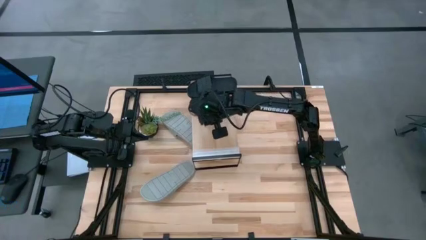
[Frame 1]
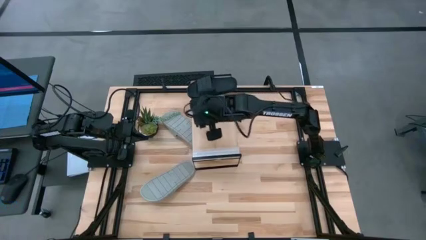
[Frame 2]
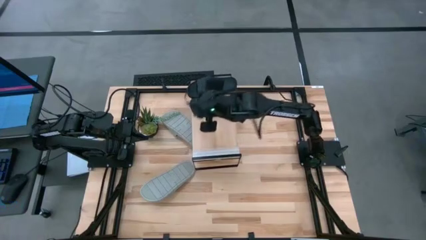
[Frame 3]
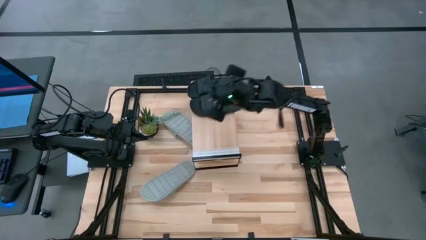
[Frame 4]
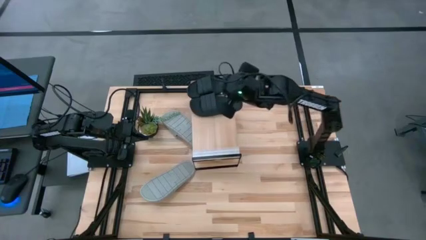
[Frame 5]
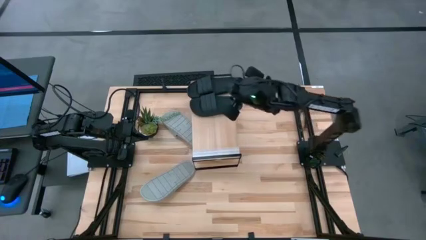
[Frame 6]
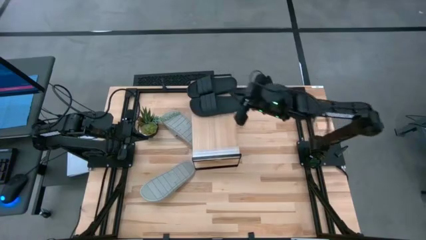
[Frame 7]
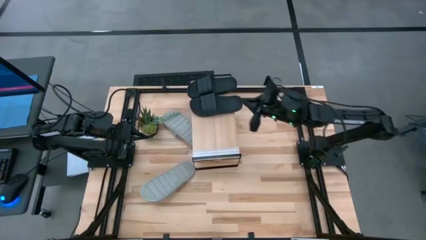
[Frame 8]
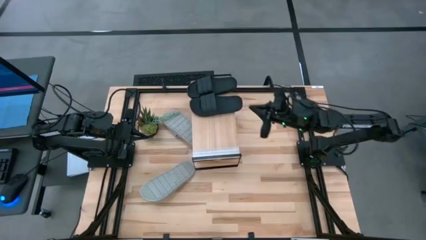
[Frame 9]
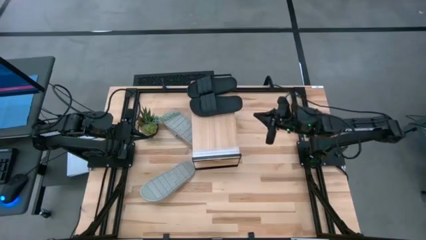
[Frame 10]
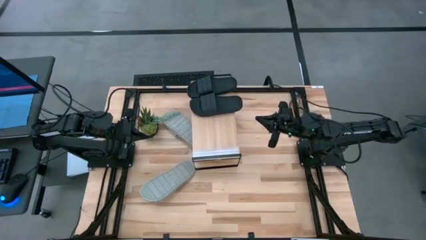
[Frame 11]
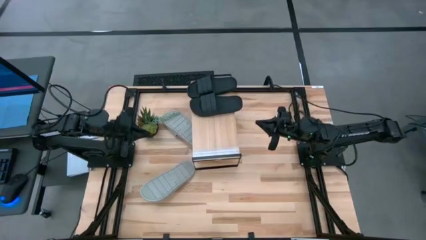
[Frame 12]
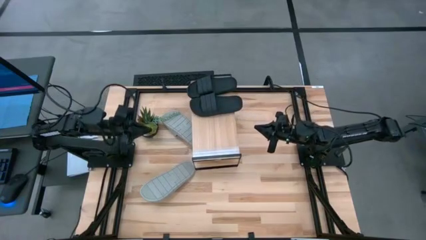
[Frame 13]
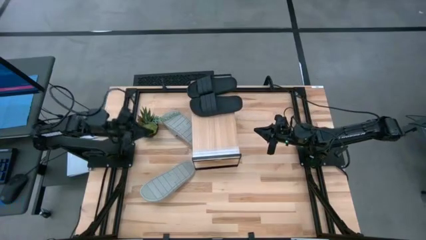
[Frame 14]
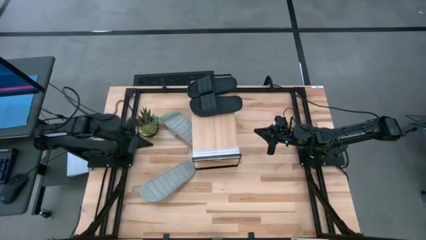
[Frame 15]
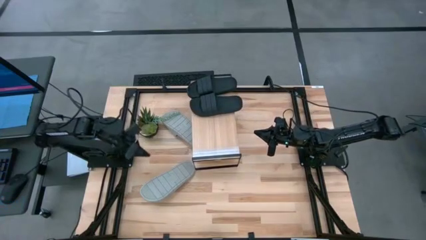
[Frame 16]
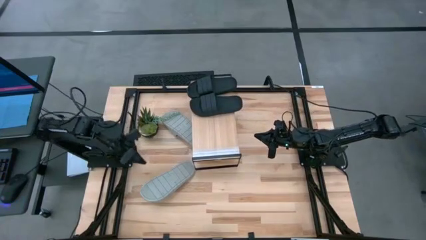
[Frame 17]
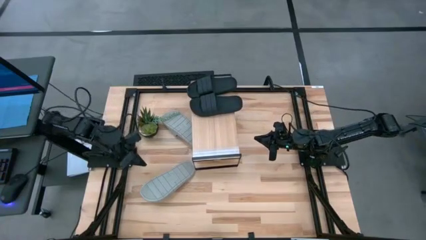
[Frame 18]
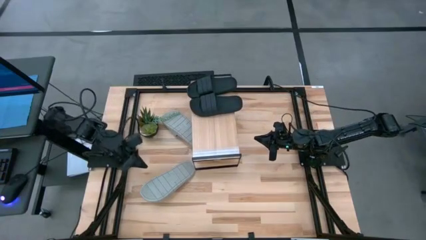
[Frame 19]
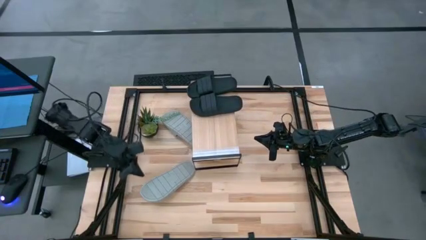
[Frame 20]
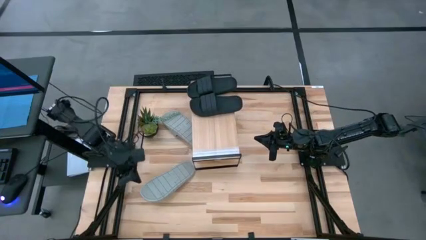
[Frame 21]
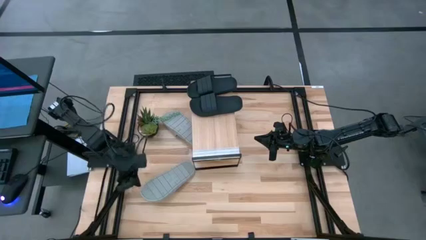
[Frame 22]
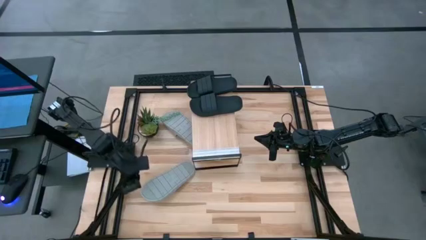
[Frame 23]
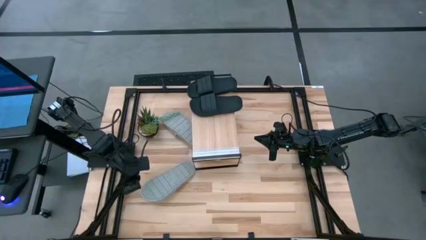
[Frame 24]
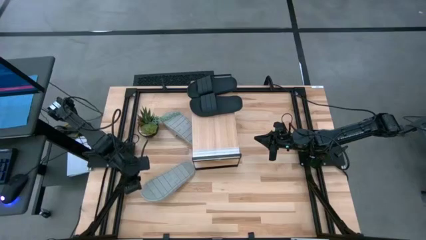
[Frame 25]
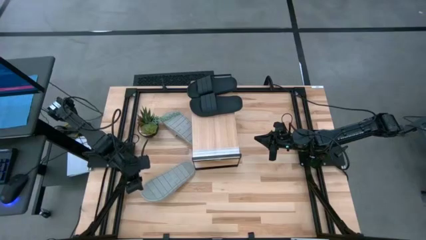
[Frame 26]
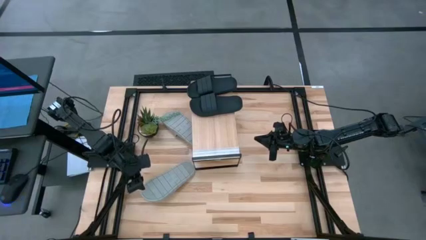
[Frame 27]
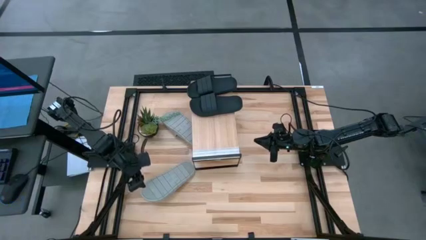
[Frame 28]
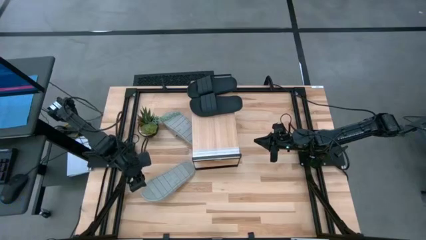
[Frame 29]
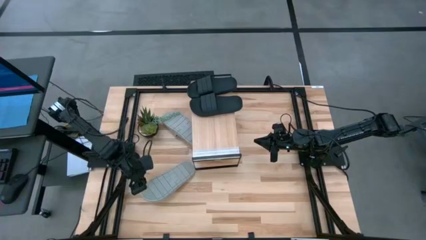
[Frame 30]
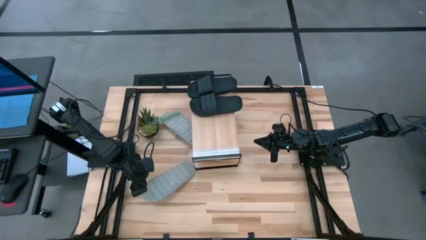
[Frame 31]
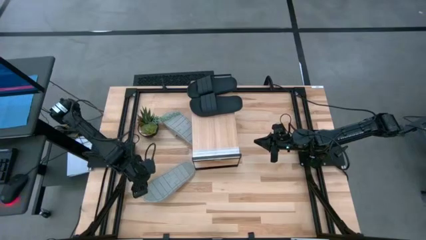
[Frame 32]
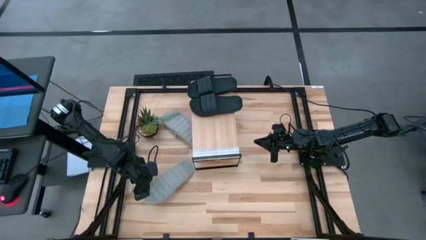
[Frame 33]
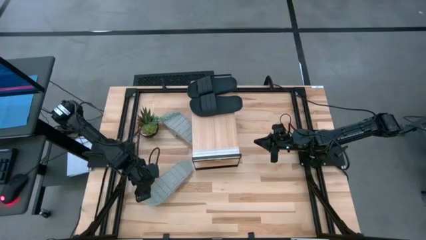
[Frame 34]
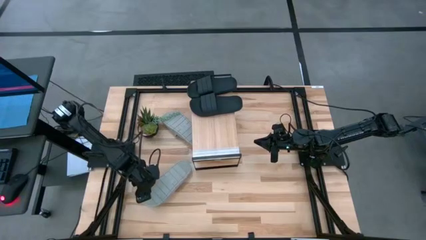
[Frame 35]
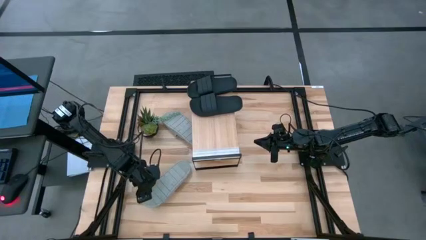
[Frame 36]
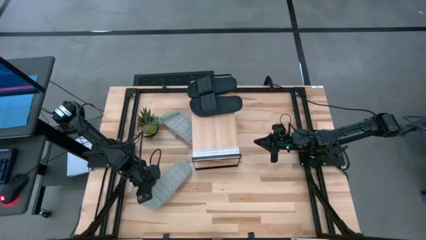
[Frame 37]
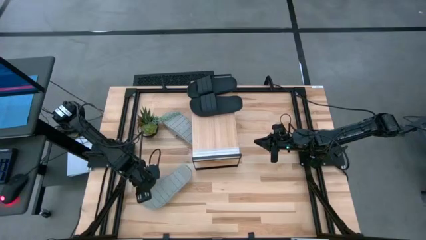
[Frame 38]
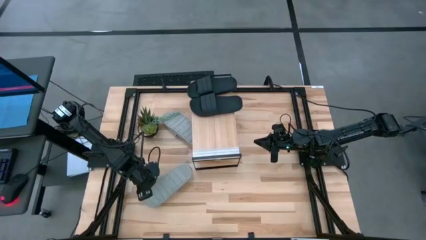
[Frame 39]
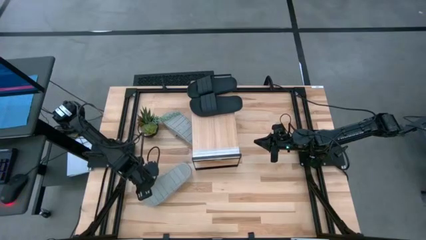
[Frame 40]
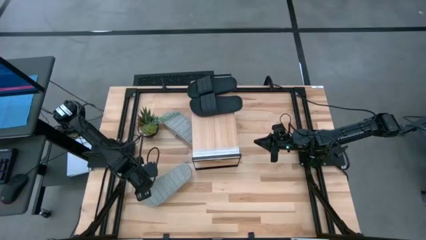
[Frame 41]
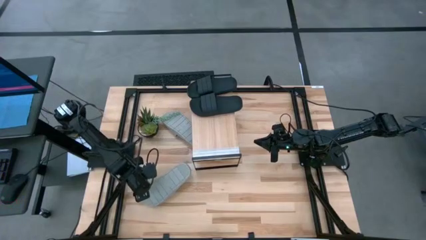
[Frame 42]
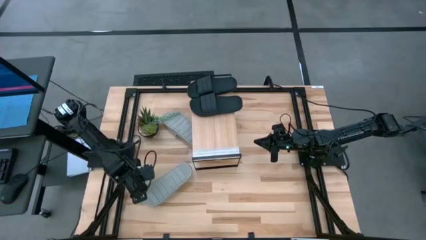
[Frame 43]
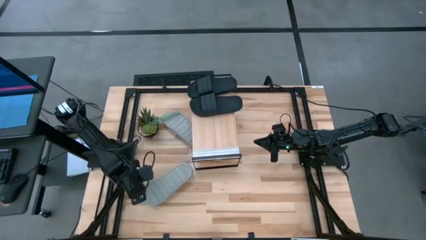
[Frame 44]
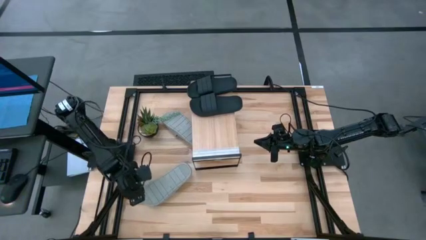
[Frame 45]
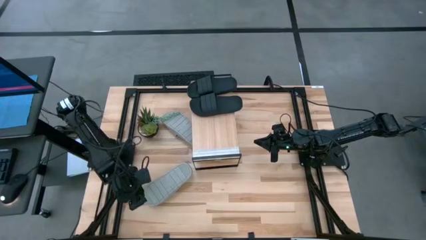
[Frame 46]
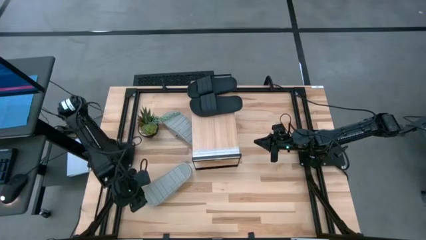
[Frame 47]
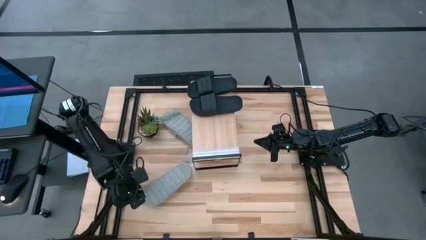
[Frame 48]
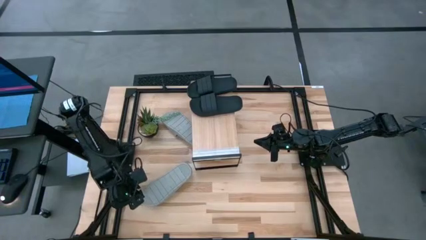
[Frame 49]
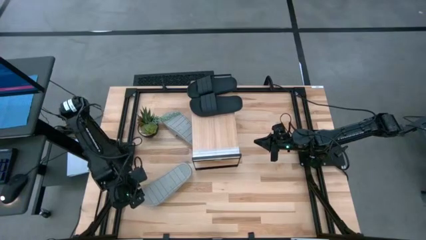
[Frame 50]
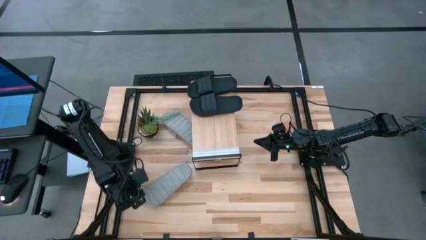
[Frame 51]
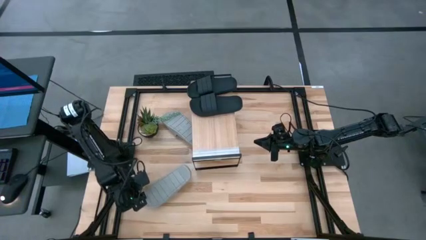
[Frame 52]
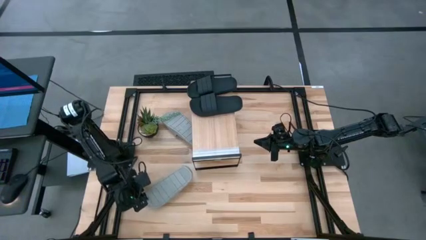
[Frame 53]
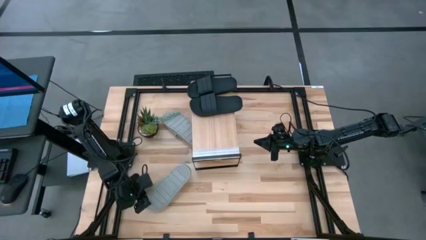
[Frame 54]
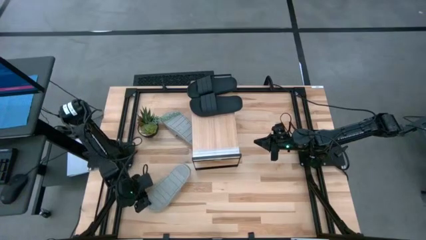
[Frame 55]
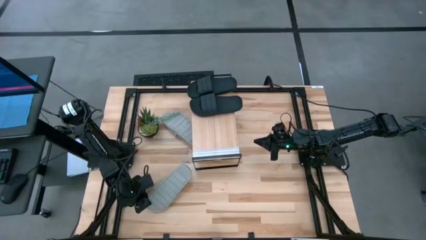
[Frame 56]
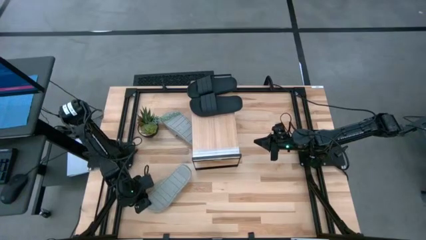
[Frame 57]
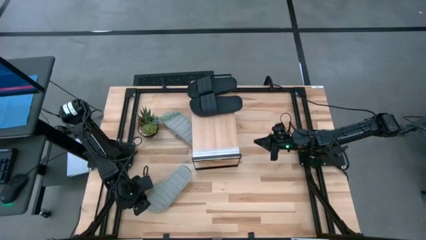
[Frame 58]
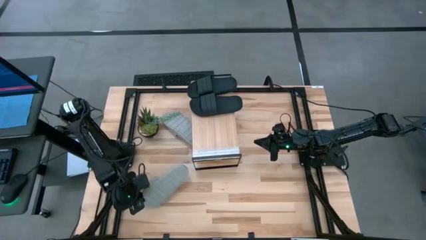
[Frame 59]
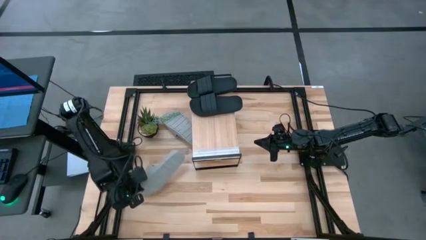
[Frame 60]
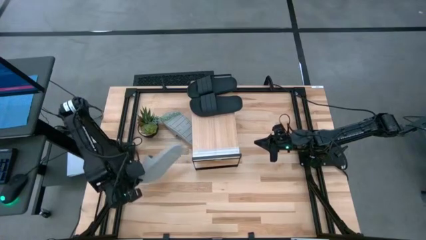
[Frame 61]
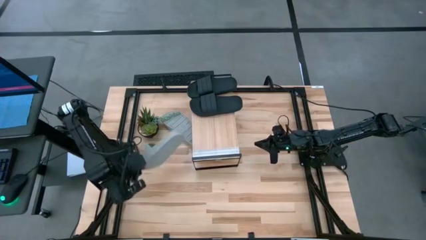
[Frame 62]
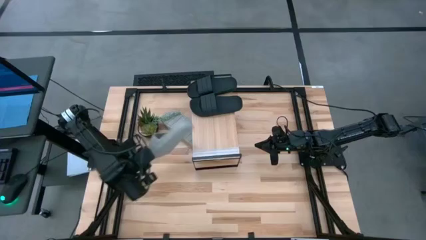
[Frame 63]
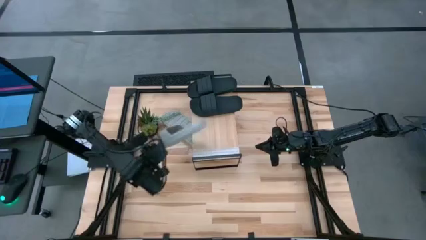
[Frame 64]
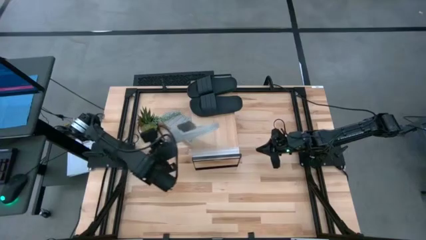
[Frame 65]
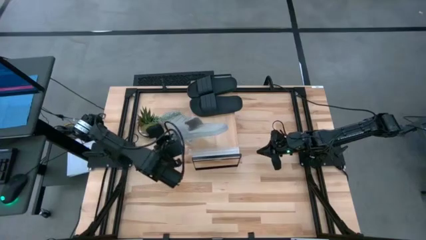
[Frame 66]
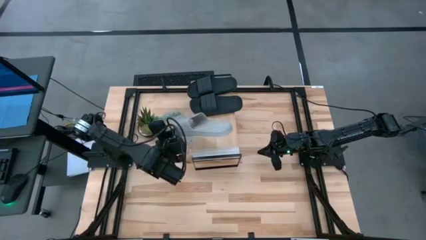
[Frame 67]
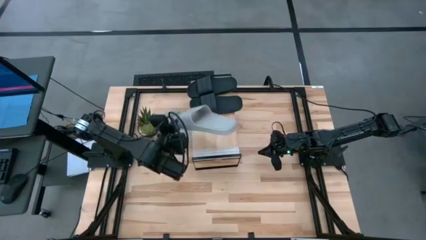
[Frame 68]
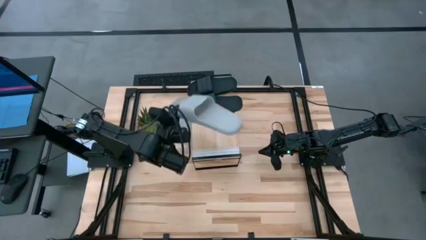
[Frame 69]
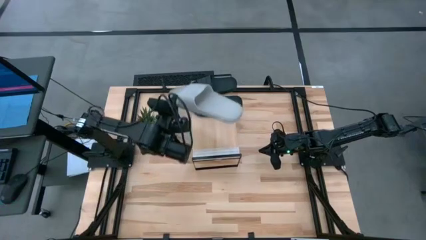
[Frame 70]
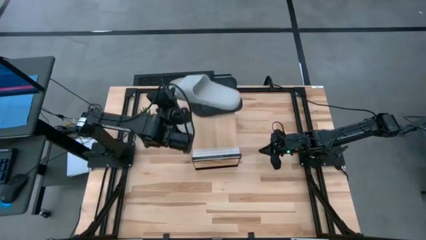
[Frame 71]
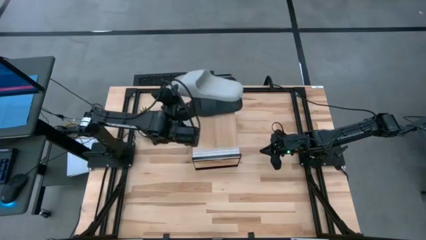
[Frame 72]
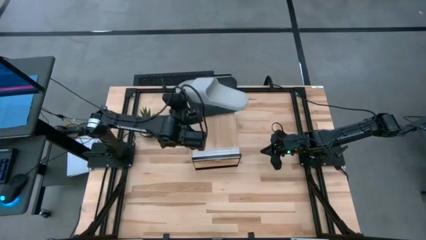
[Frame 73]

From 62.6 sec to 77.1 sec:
Task: Pick and place slides into the shelf
Put the bottom gray slide on the shelf
